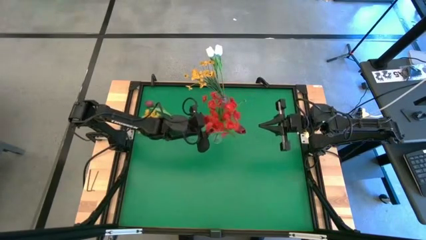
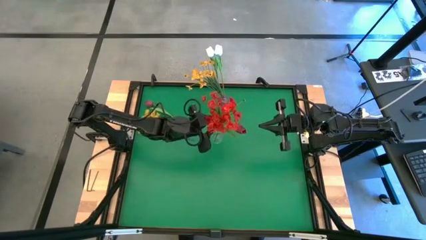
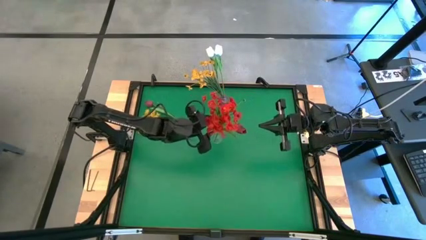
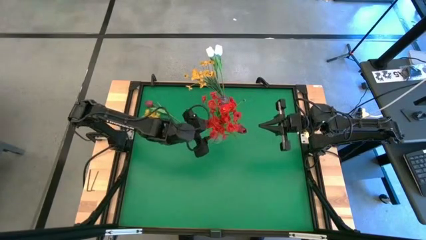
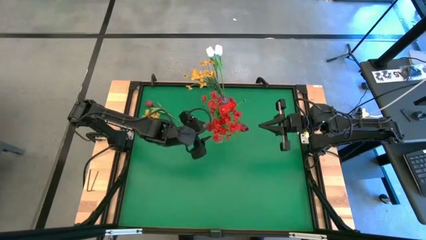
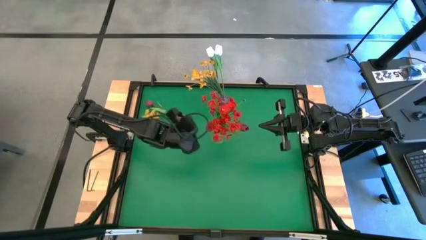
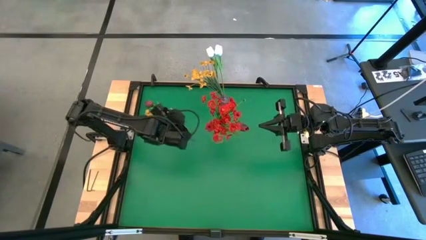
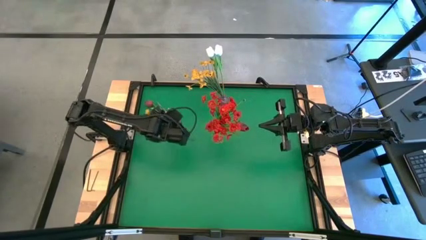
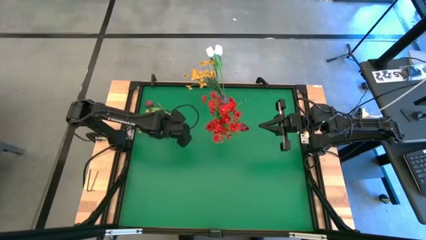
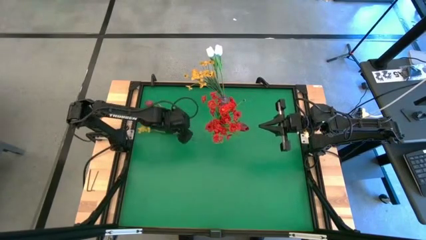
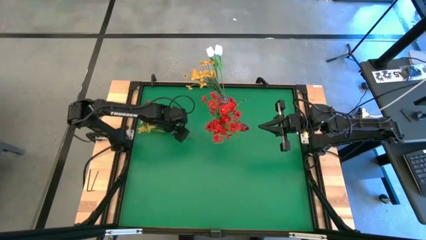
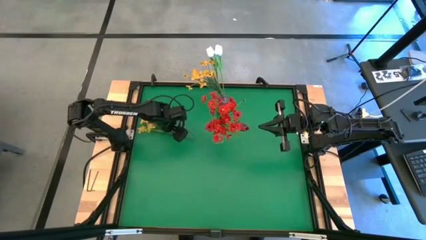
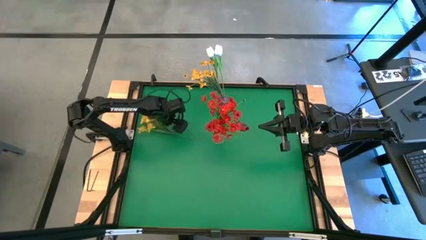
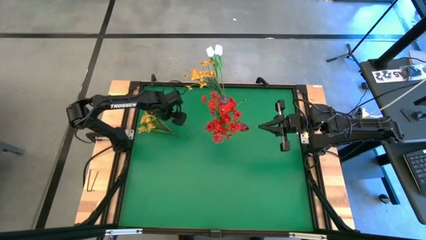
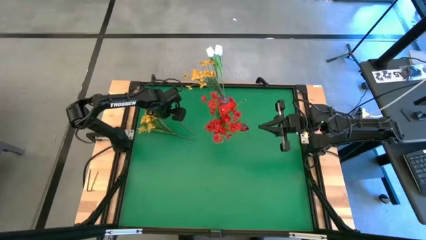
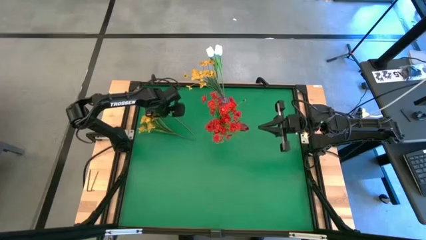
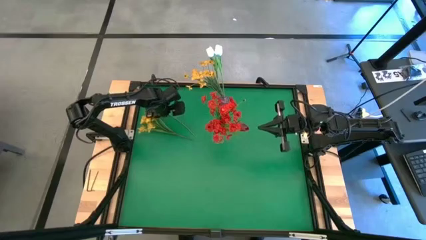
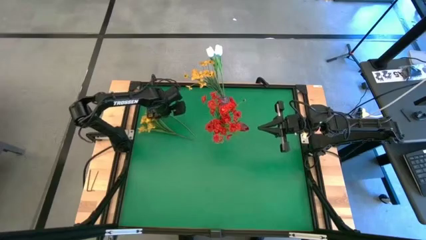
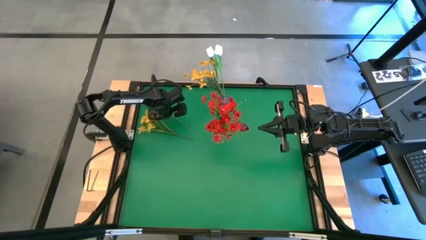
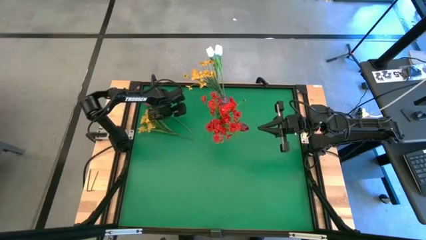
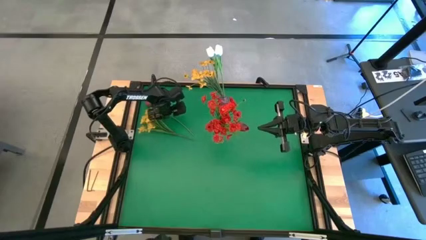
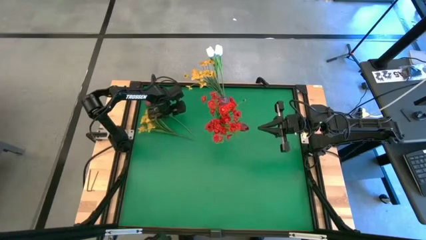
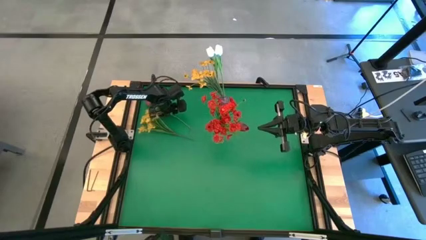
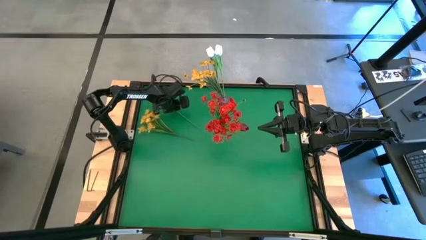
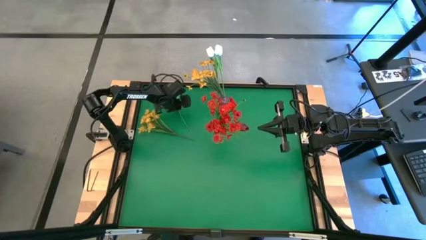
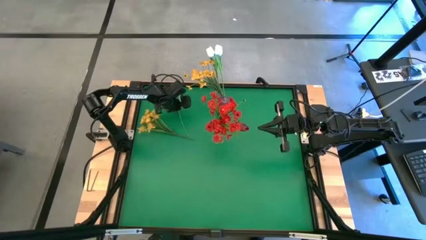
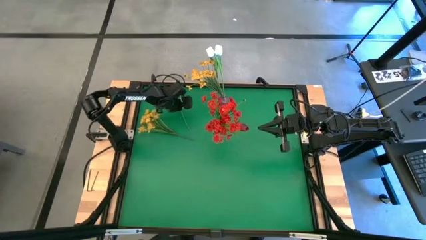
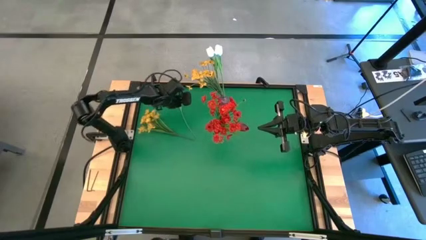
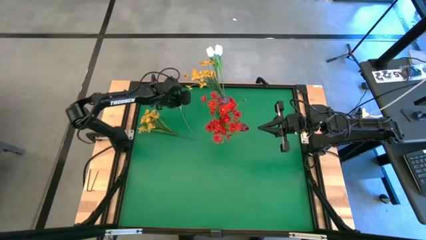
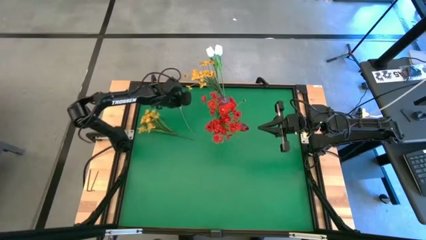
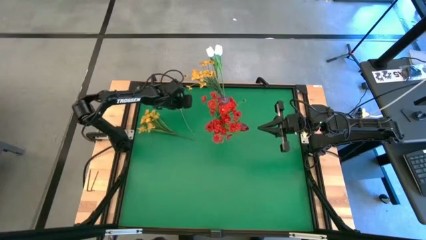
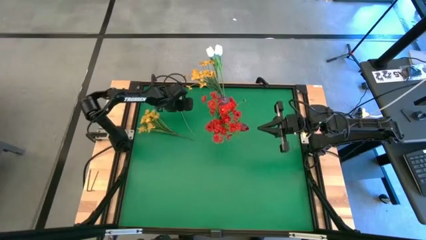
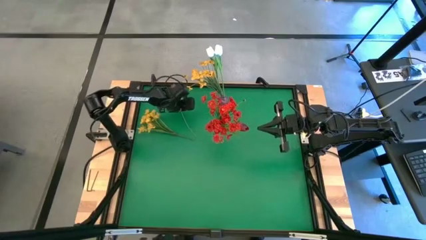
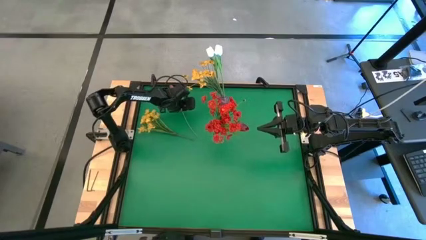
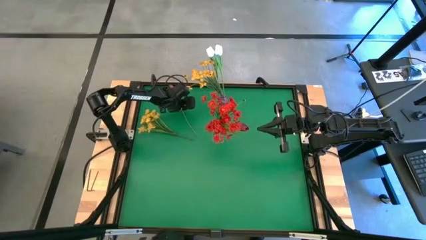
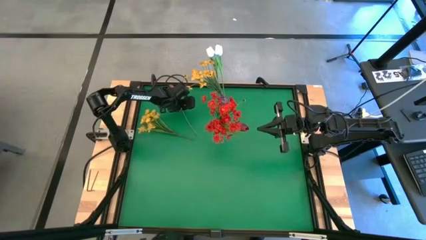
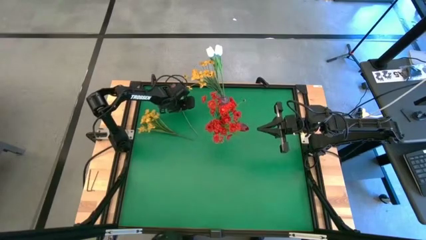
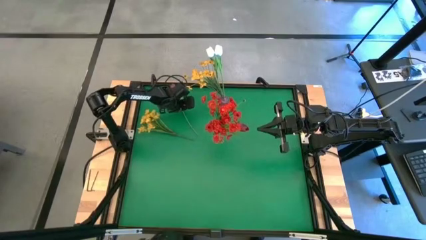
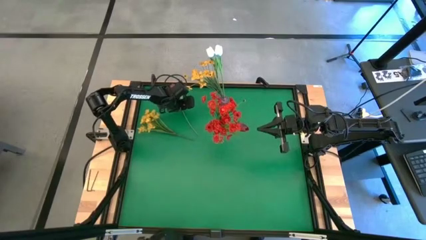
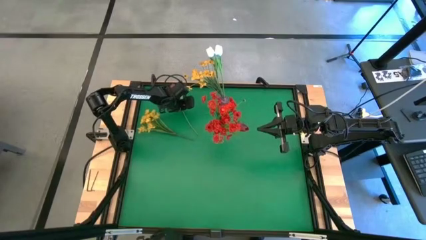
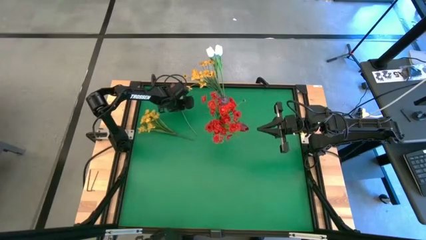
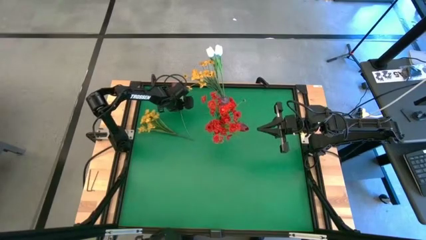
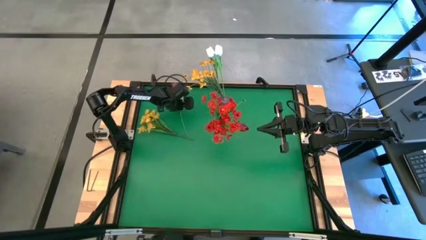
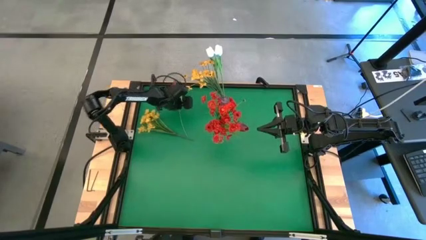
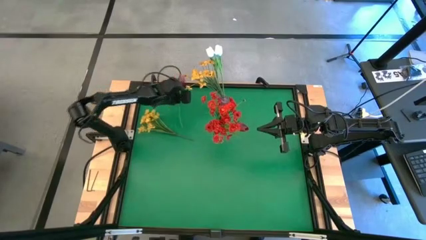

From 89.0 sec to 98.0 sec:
Task: Sort flowers into vase by color
Put the red tulip into the transparent vase

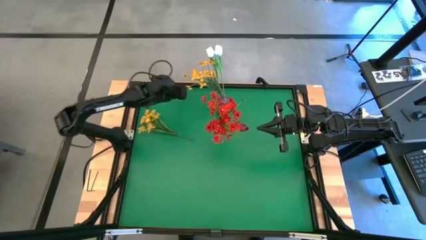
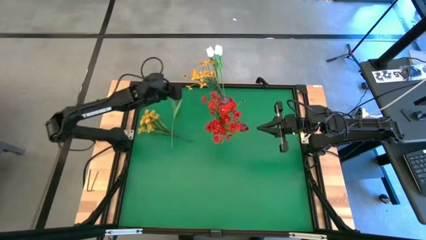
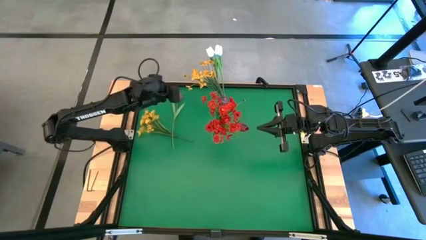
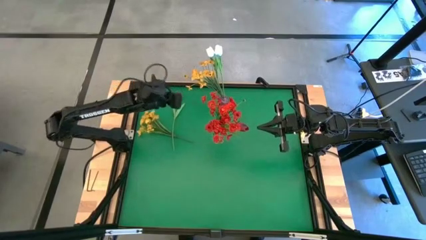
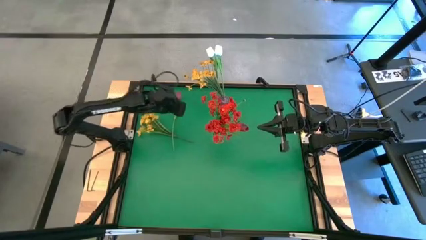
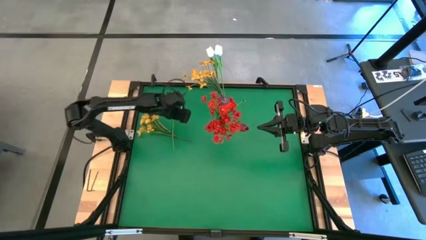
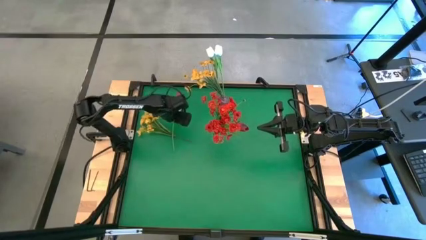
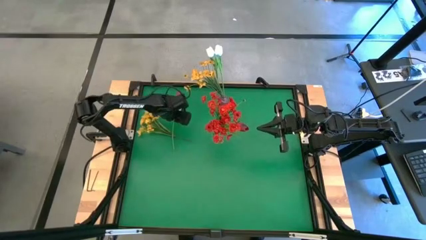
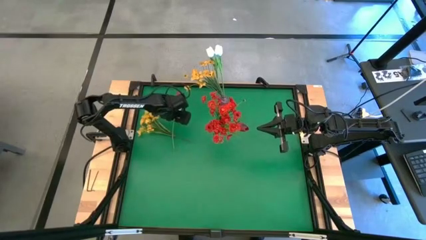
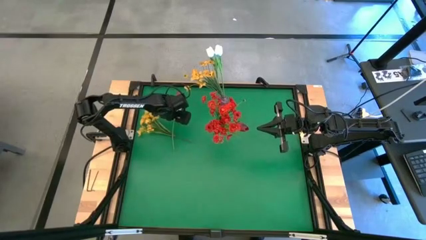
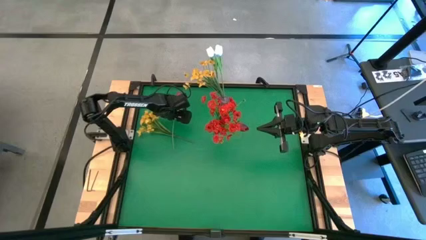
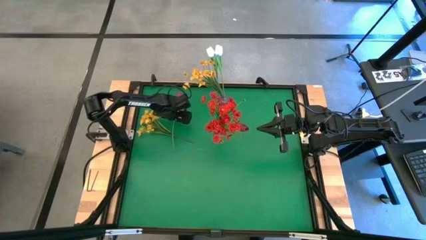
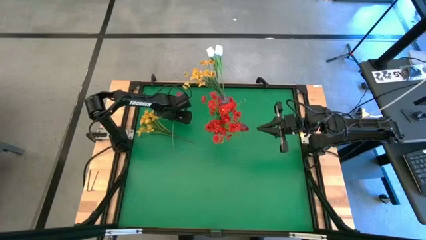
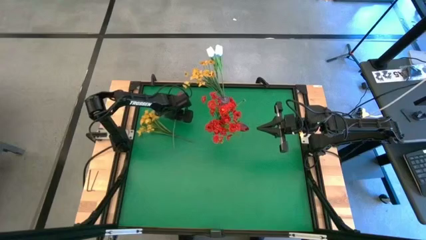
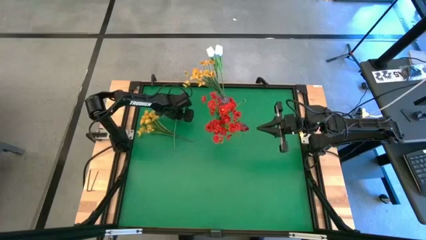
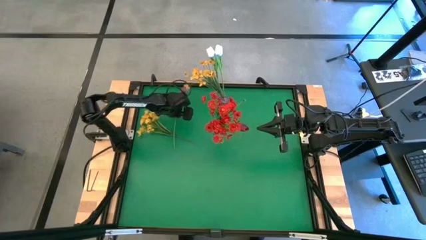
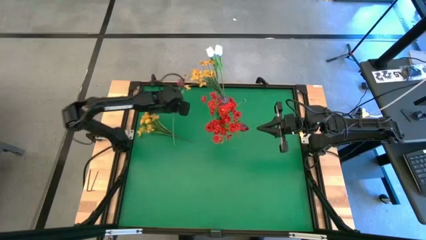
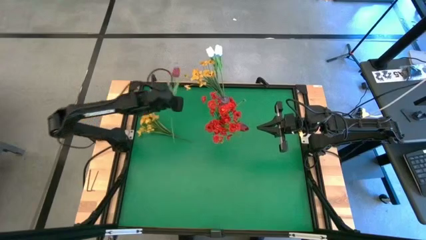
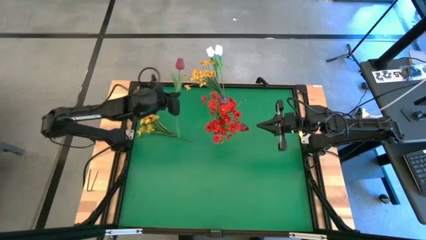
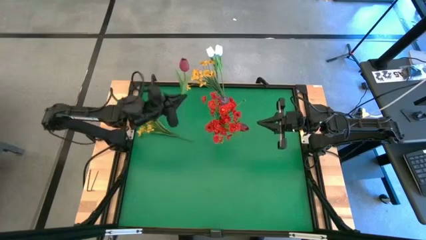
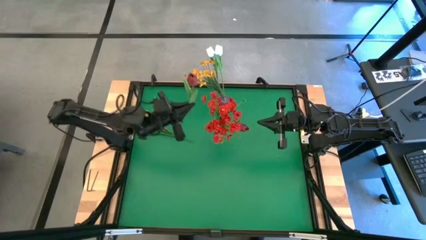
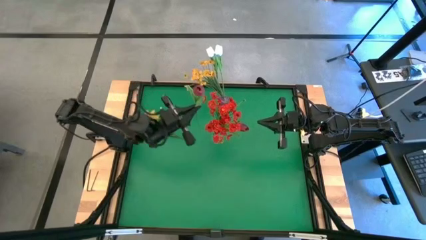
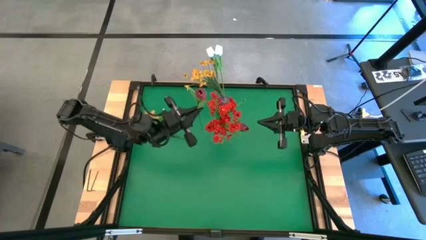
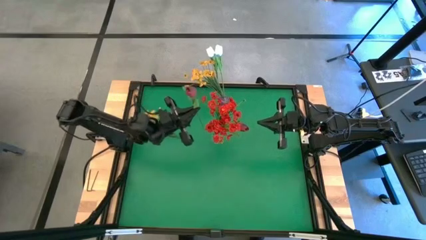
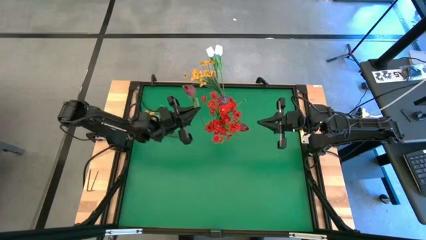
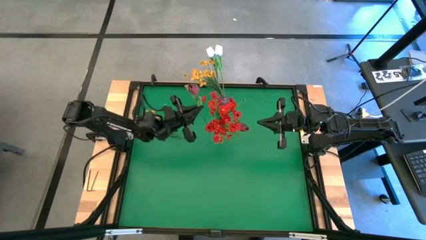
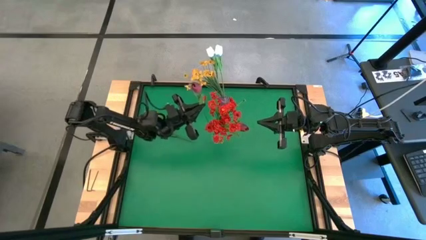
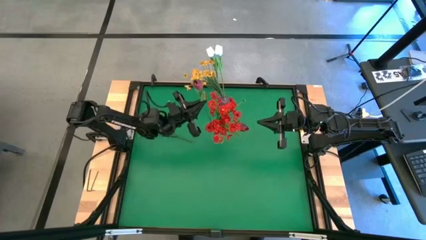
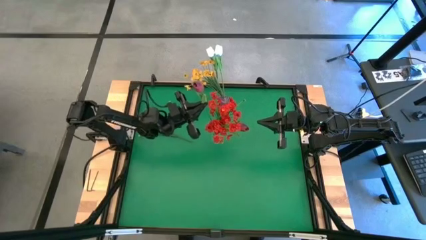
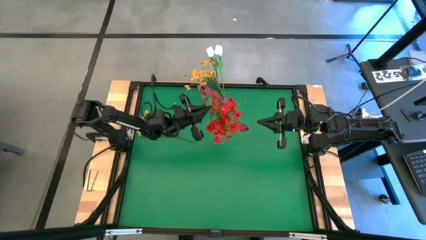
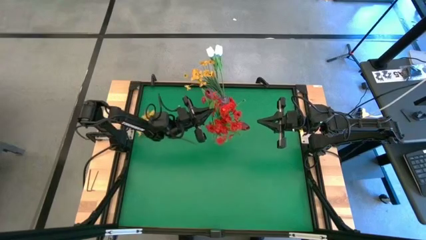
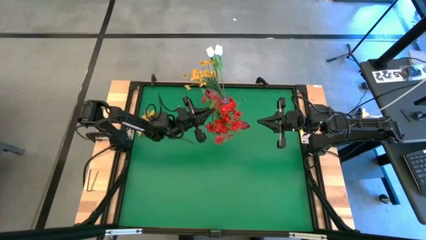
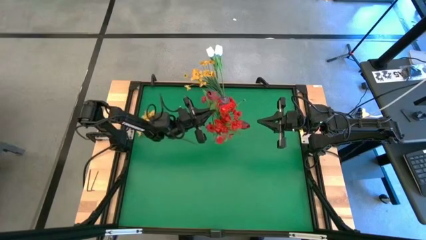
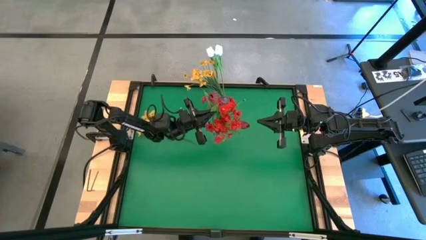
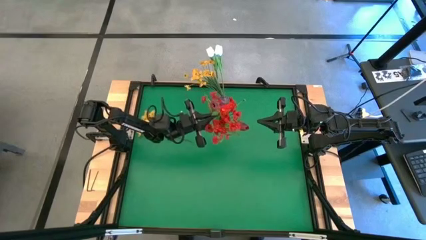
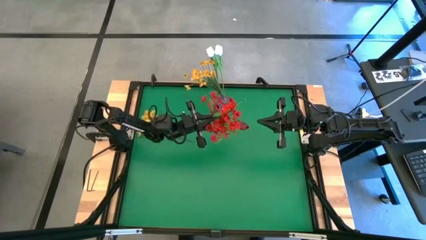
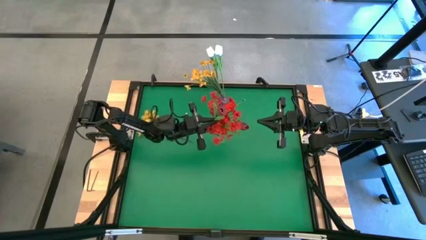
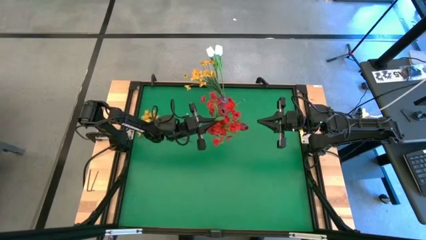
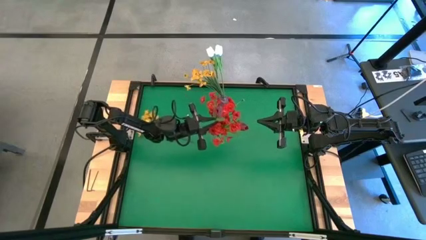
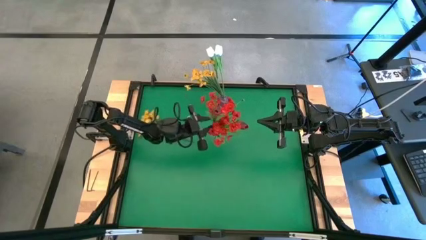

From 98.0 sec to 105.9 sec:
Put the red tulip into the transparent vase
